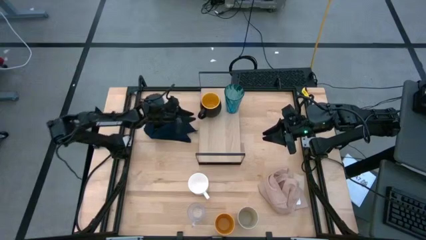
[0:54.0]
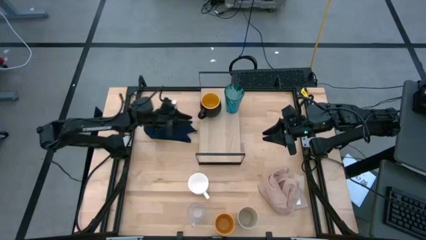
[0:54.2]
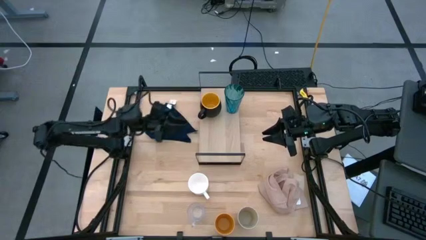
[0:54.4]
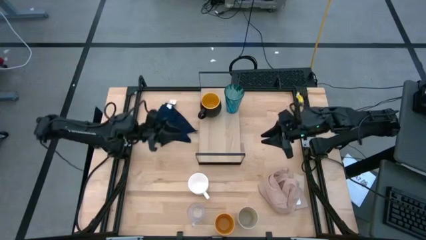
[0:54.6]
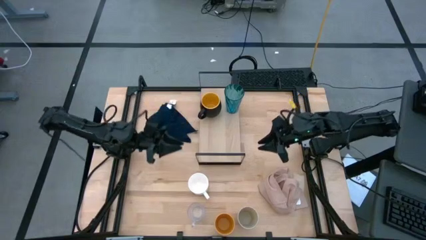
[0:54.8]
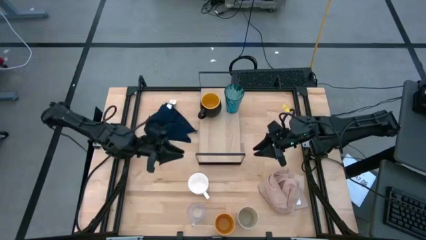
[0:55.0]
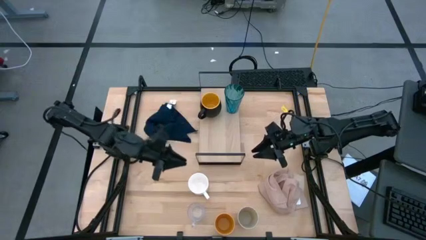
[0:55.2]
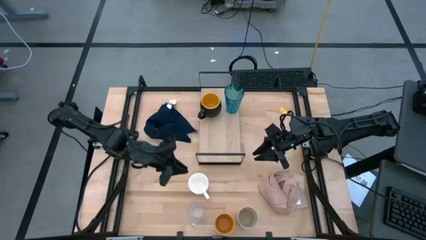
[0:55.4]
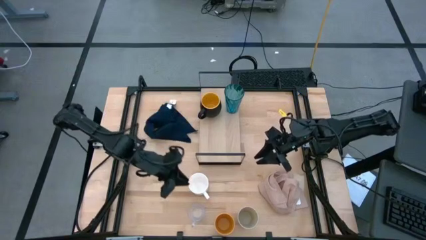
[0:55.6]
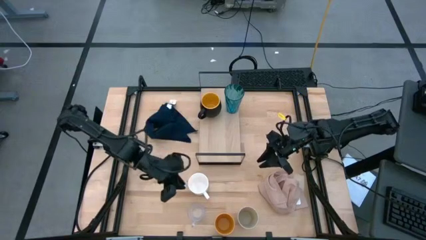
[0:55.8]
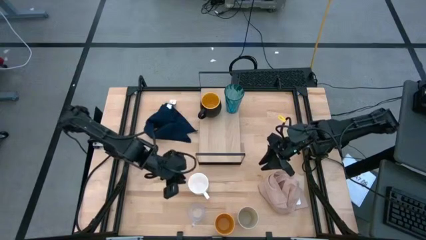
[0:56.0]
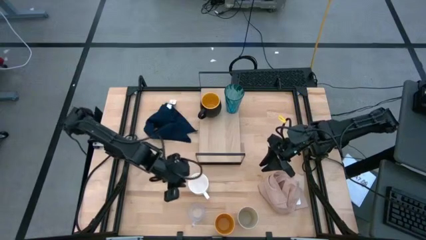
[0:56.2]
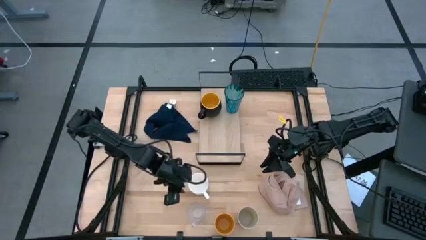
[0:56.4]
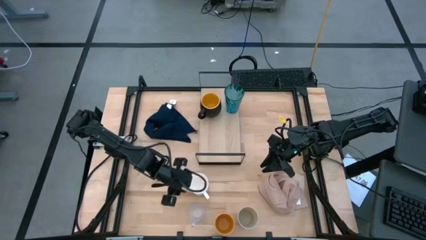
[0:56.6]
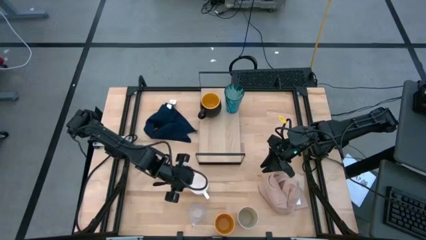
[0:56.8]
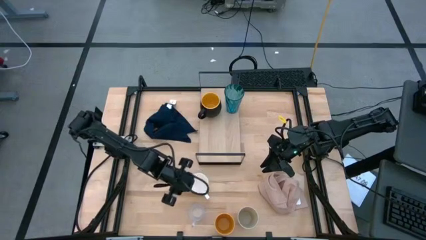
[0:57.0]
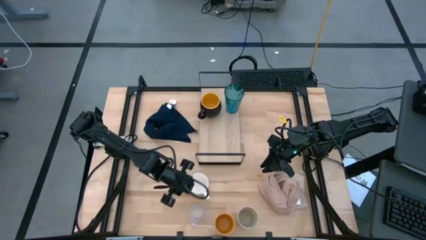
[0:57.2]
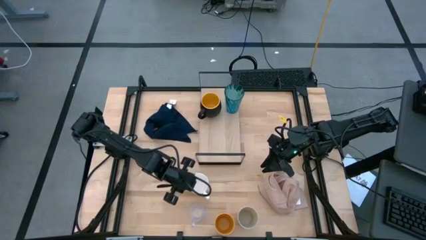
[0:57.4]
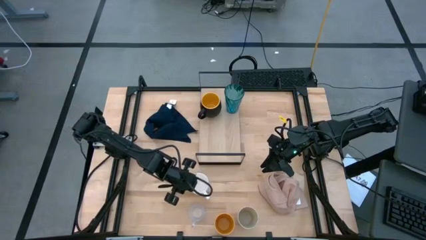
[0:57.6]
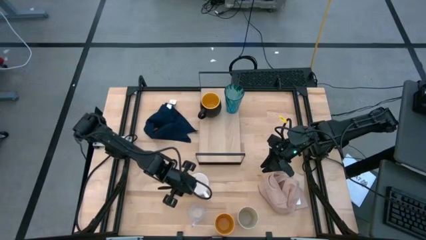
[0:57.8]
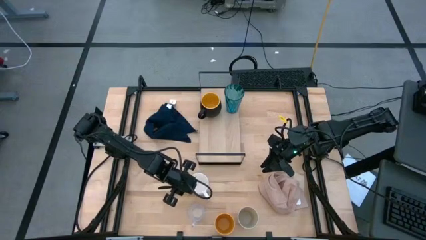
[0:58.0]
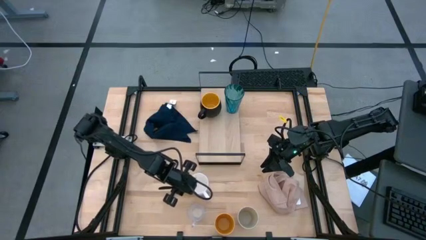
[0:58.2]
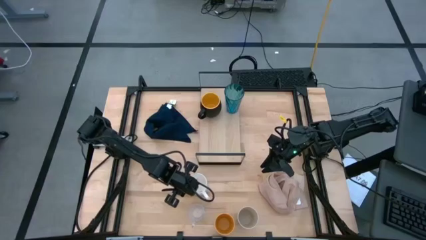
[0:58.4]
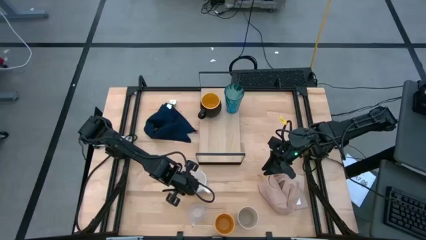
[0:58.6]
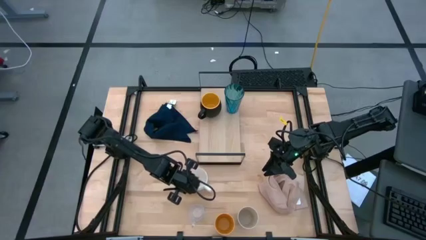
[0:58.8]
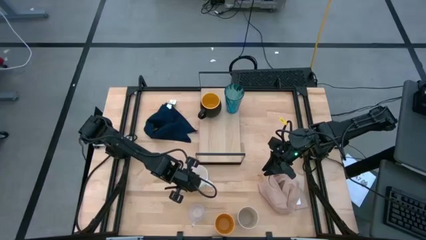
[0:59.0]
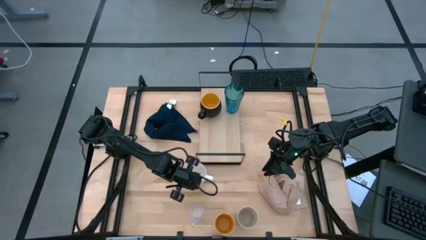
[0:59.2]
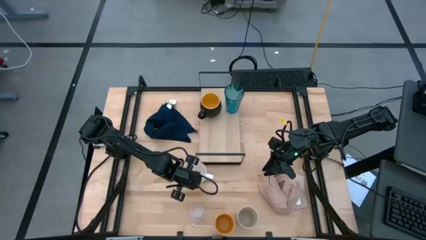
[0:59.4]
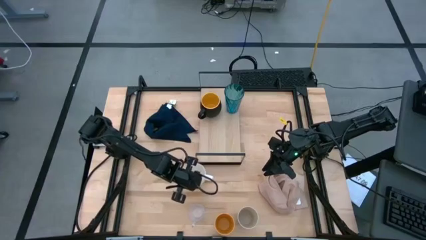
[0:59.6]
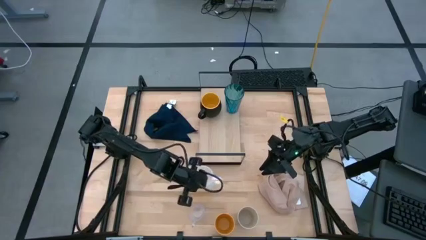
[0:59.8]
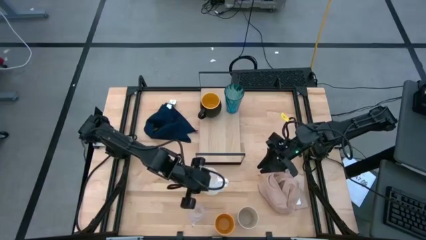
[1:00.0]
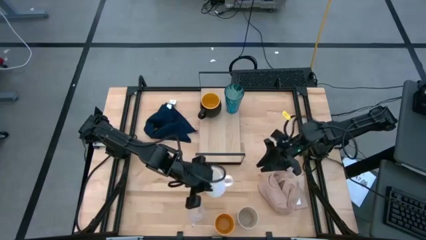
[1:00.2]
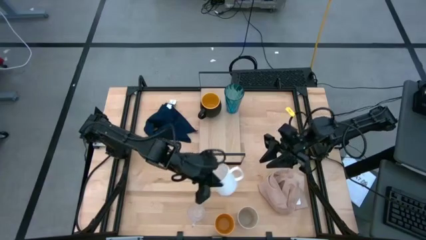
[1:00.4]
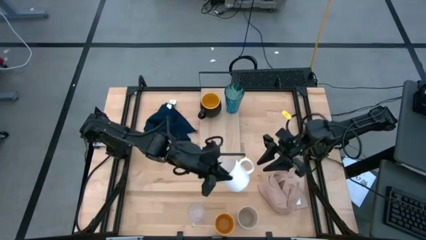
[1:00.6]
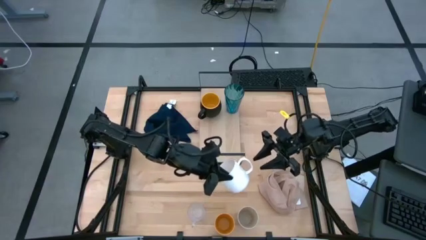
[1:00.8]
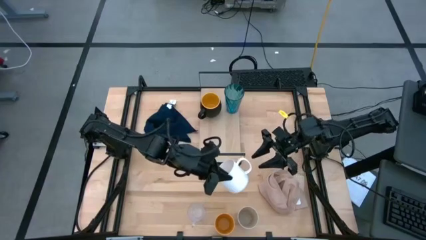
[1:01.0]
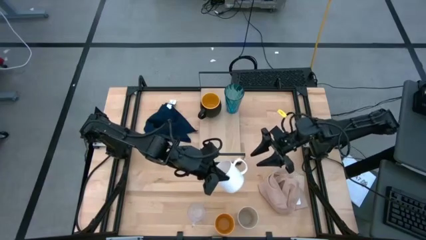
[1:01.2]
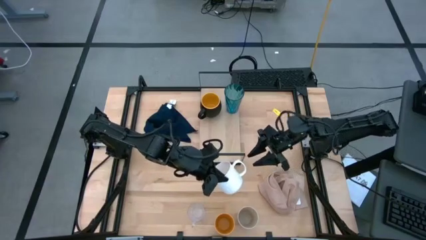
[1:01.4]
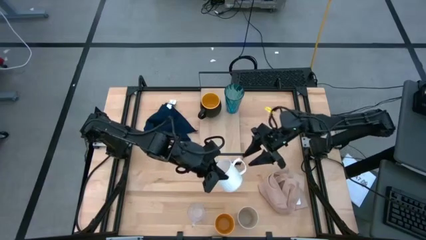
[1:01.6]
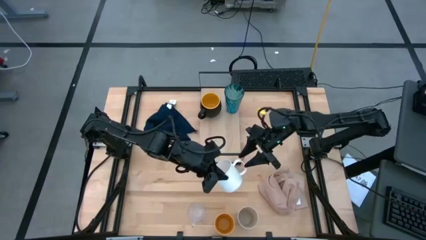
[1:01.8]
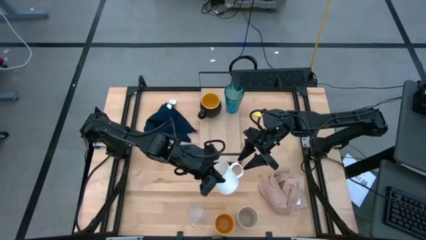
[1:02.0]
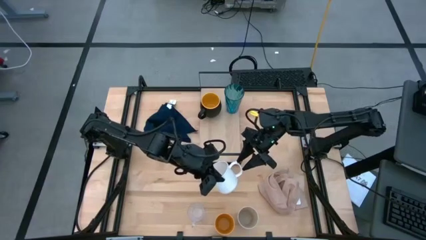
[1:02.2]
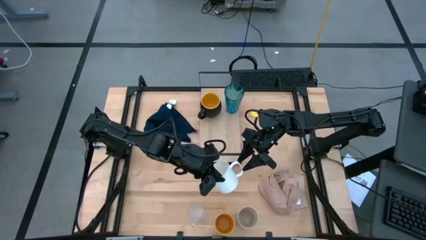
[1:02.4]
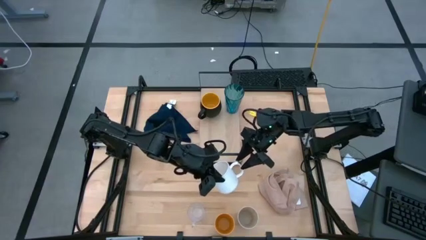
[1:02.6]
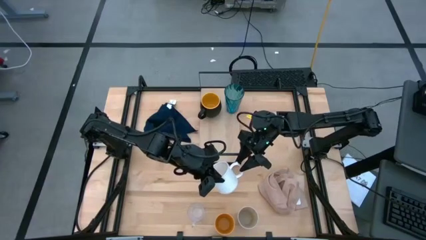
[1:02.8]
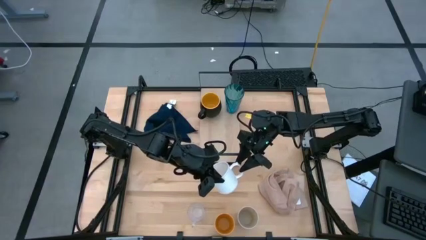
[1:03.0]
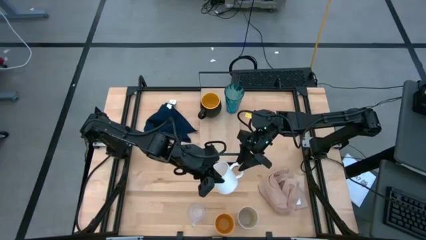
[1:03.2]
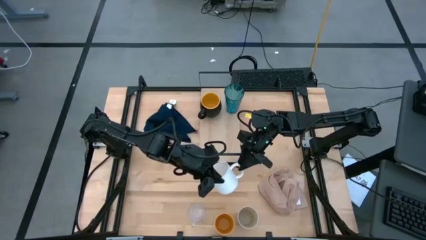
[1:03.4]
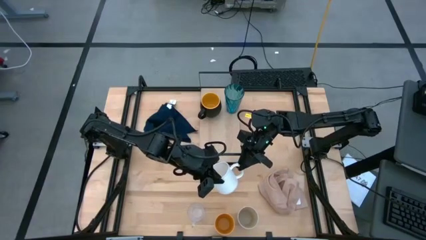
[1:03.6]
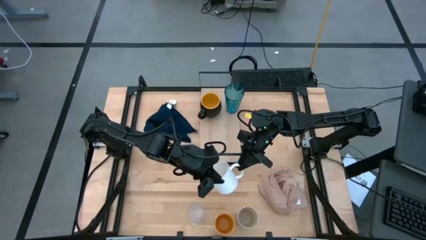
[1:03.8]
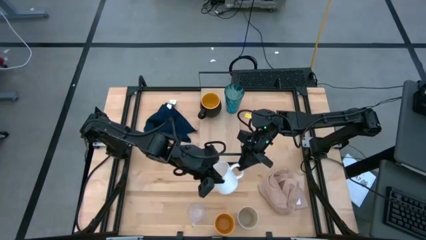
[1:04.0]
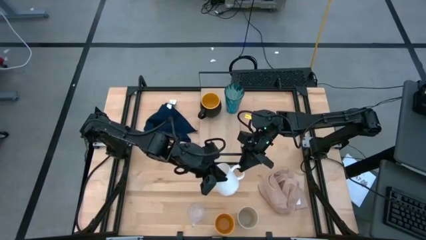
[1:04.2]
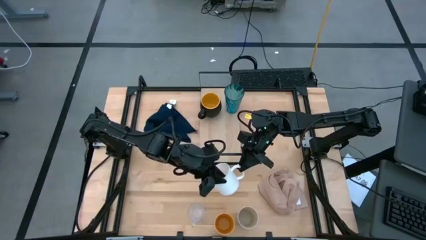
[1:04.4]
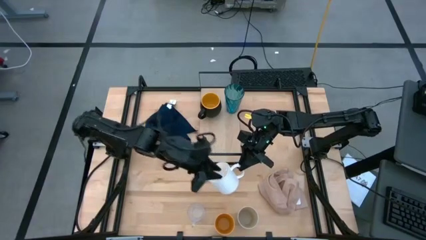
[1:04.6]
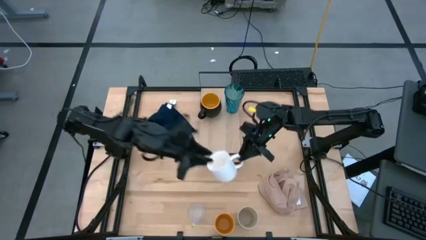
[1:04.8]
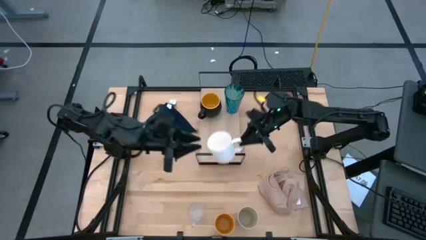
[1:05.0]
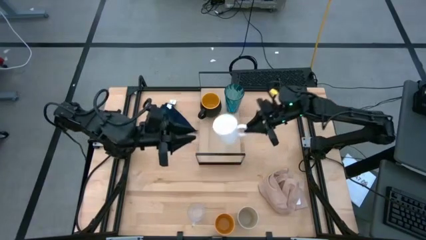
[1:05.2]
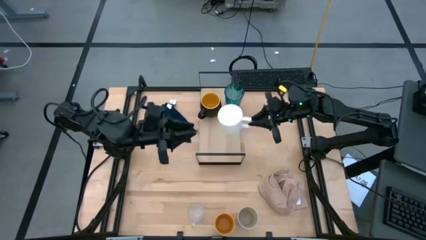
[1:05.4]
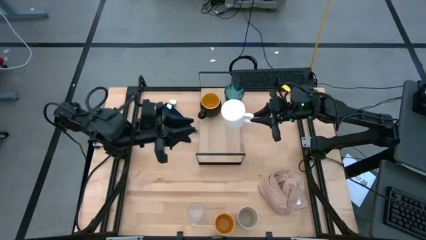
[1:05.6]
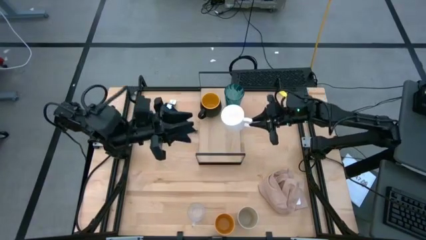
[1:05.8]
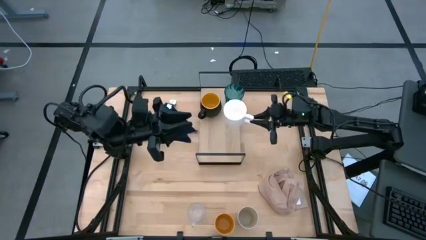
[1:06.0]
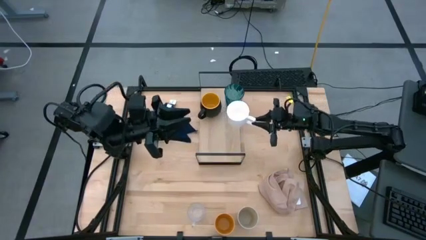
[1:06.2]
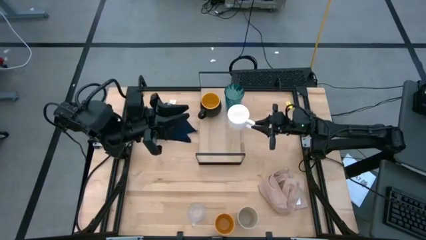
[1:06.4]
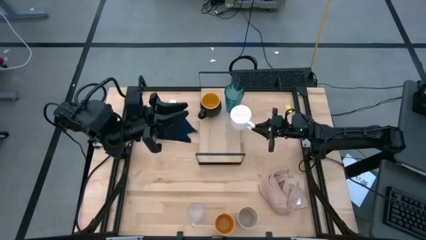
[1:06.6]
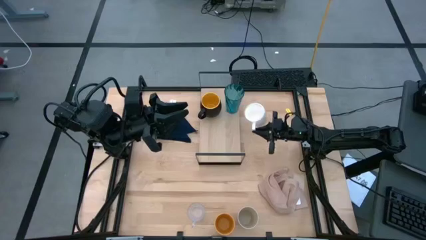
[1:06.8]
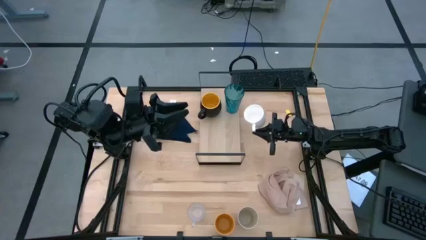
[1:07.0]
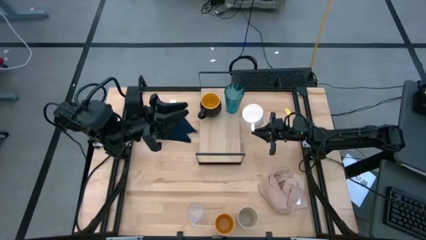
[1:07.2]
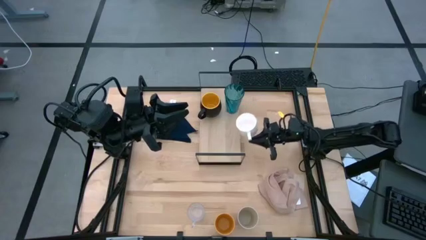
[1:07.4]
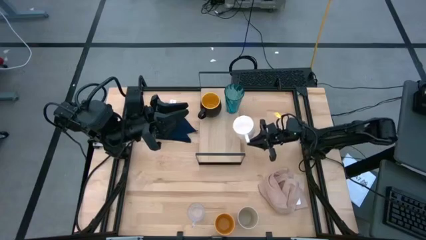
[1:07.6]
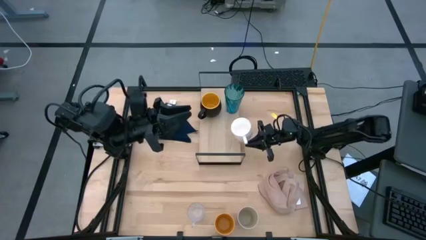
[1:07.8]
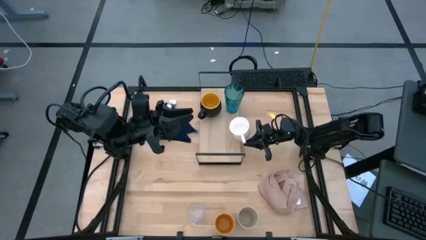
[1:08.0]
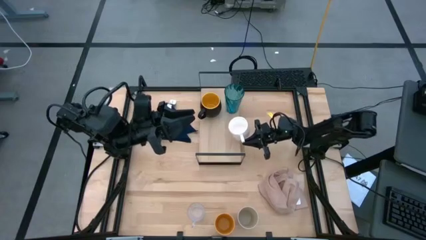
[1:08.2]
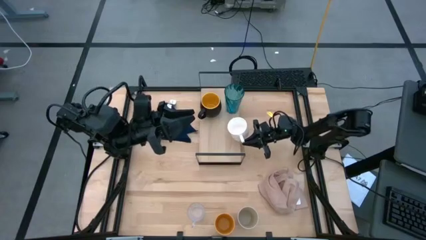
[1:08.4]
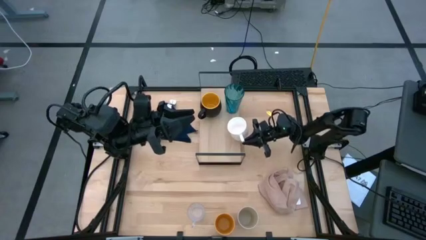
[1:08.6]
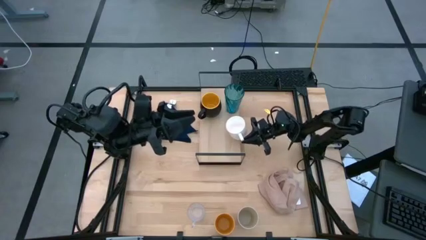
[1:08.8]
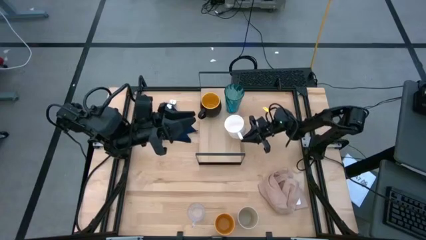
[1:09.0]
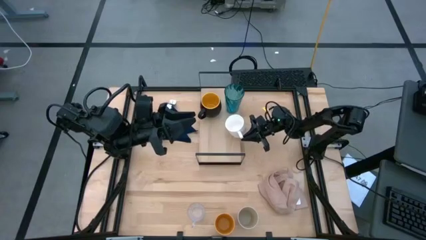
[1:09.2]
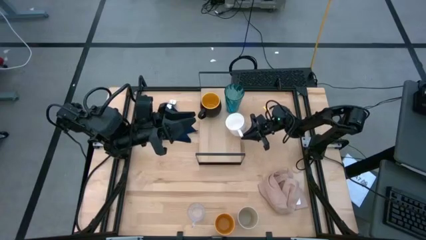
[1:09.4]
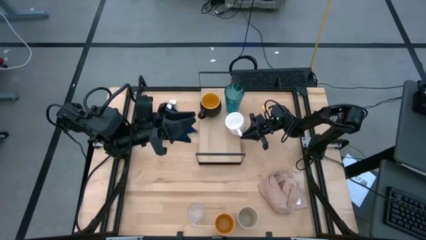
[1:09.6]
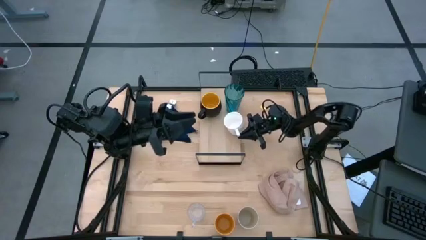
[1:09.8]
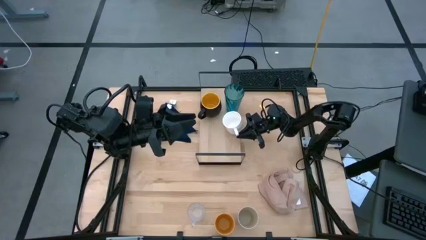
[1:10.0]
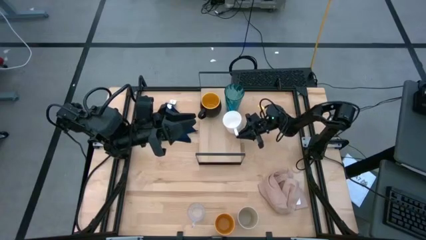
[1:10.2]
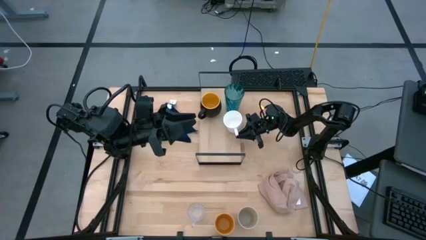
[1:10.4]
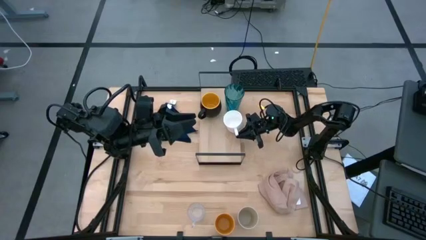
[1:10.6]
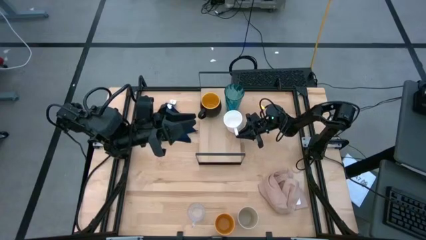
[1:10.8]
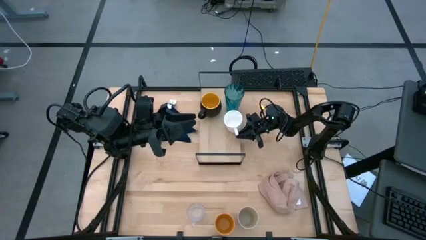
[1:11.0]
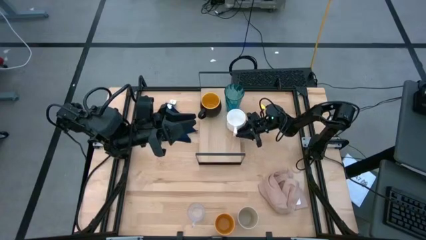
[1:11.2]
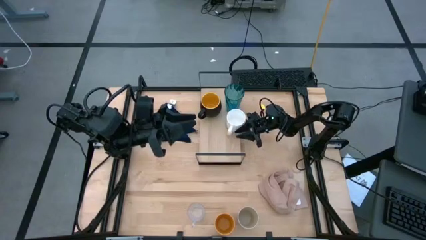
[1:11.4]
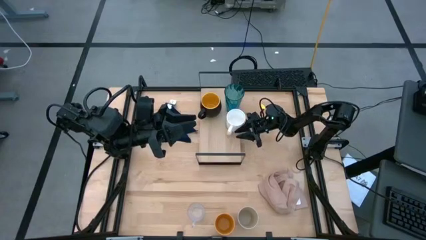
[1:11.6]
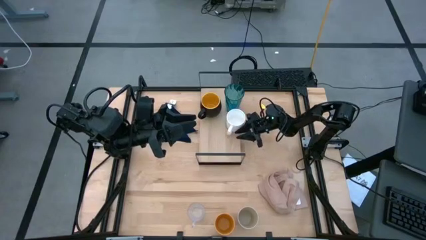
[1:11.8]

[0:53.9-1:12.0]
Task: Stack small to large cups/mugs on shelf
Put the white mug on the shelf
